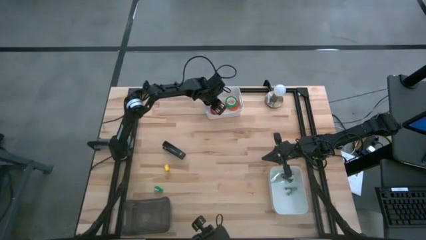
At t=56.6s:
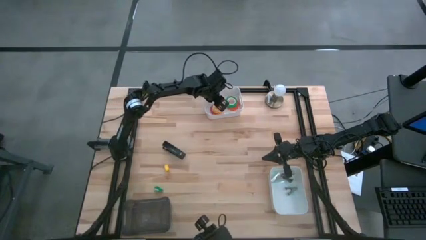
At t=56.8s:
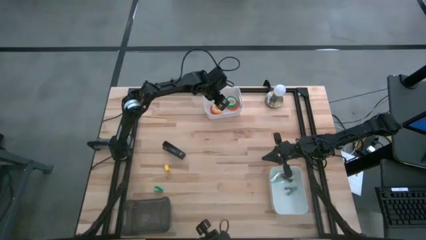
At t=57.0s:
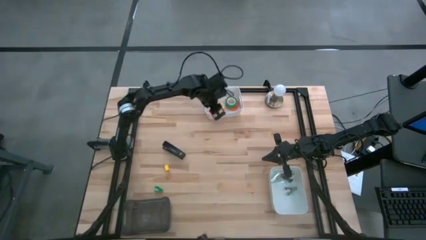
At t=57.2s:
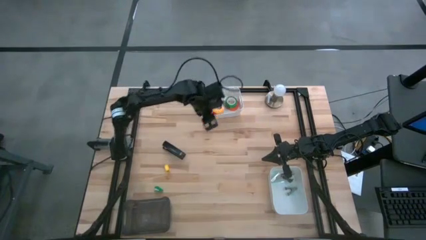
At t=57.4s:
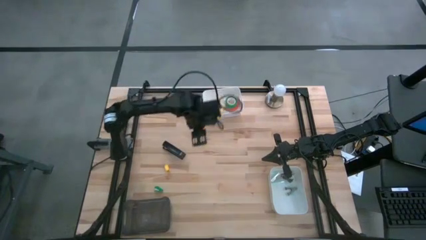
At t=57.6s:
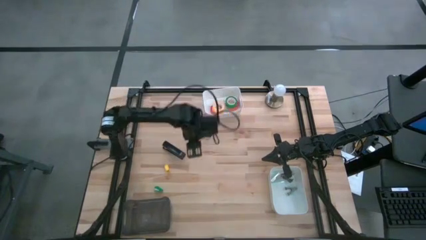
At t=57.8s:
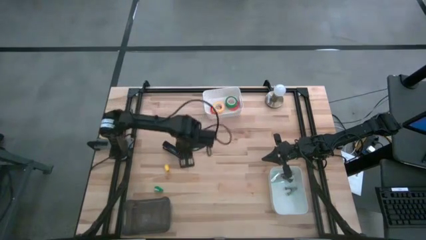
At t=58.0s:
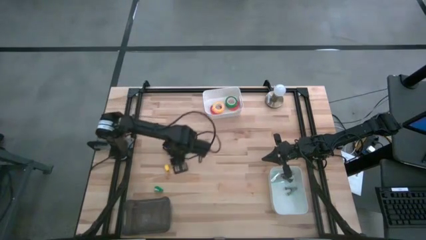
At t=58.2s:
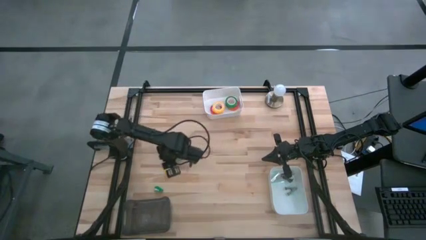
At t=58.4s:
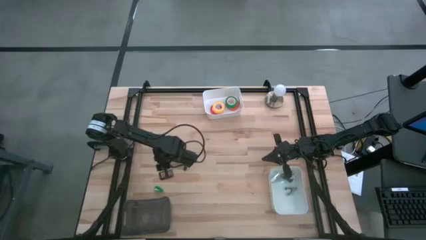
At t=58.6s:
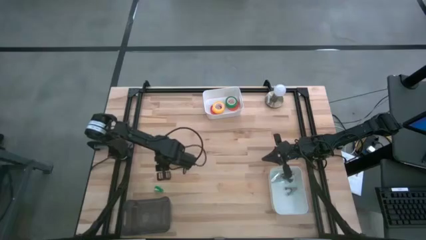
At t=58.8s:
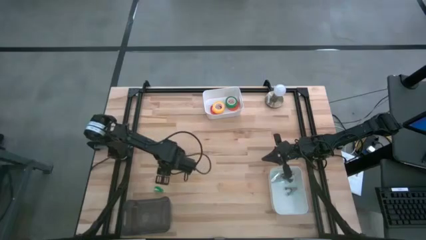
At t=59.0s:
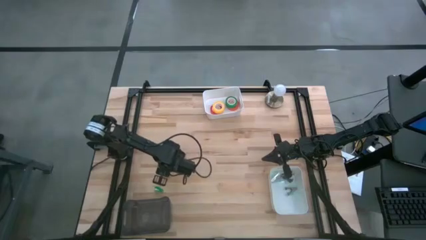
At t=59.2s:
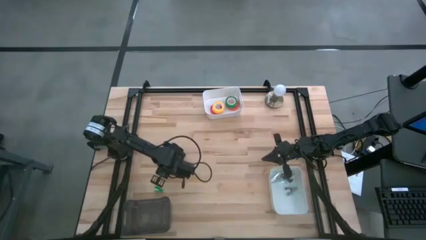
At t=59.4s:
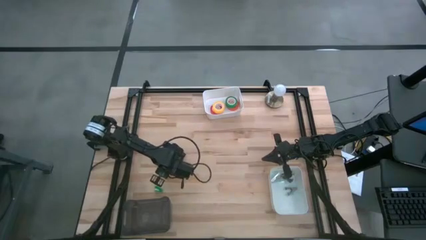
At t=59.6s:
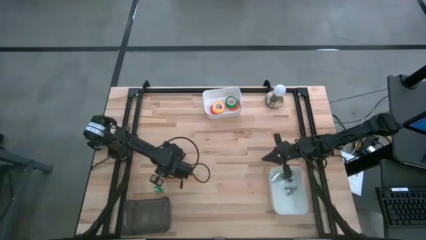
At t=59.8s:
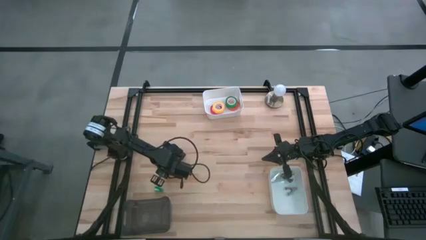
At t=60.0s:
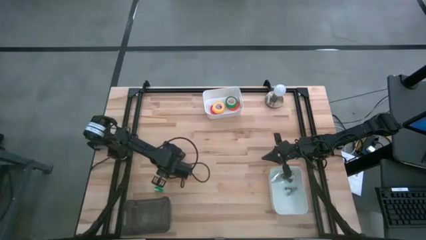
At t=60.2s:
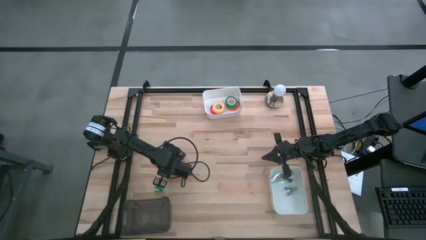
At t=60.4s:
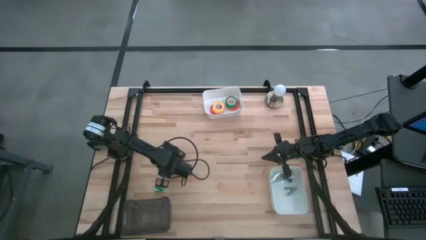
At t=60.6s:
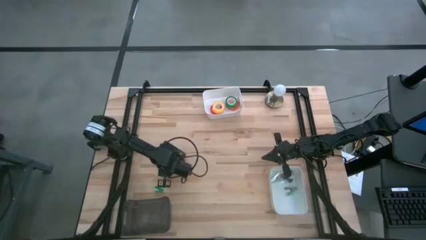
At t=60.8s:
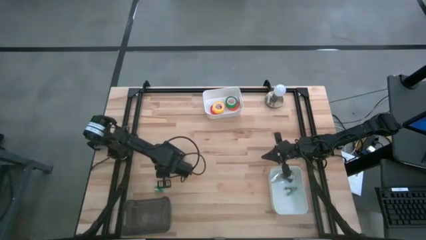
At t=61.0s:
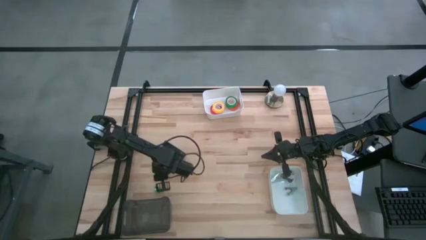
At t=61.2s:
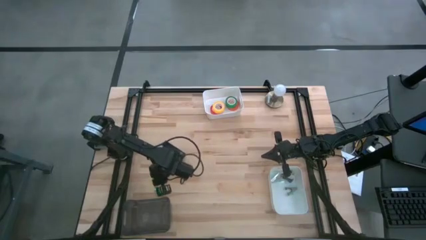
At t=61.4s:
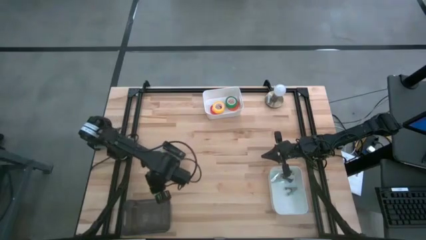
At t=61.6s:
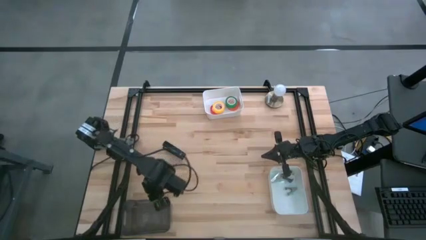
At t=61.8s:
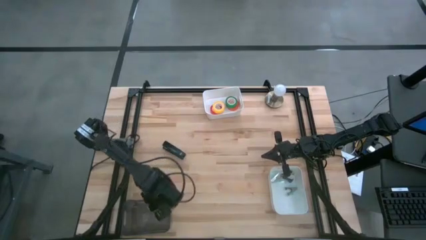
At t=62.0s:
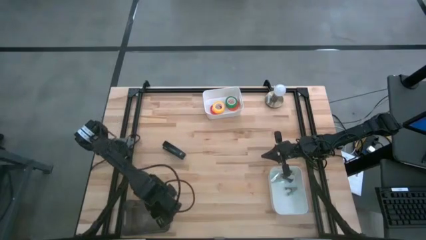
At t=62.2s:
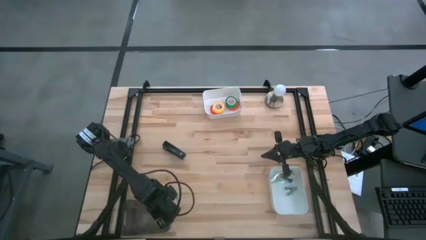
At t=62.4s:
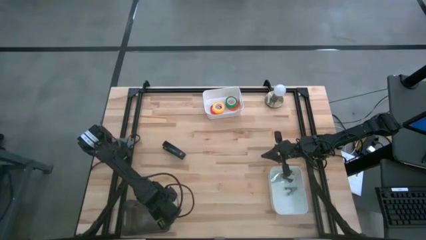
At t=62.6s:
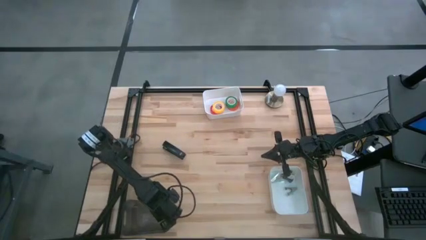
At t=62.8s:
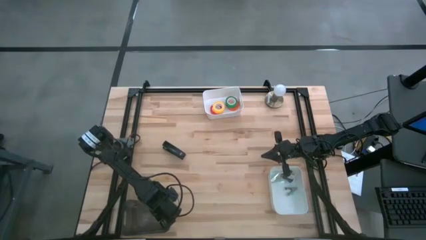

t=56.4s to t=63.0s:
Task: Pick and place Stapler, Stapler remover, tape
Put the yellow small stapler into the transparent bin

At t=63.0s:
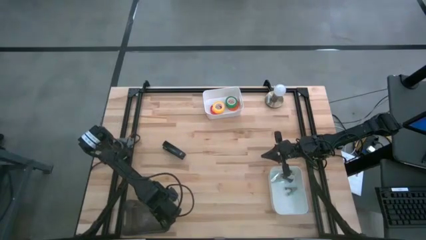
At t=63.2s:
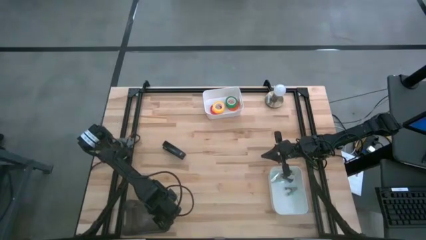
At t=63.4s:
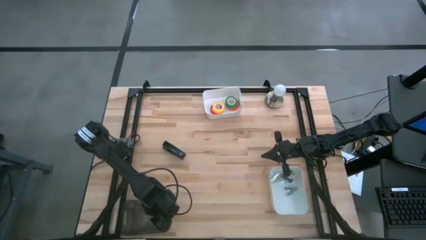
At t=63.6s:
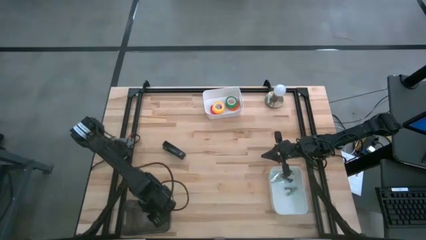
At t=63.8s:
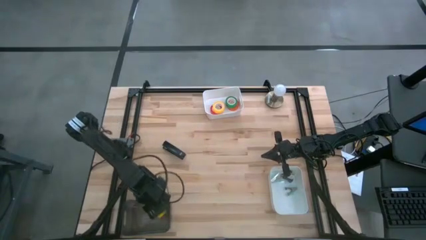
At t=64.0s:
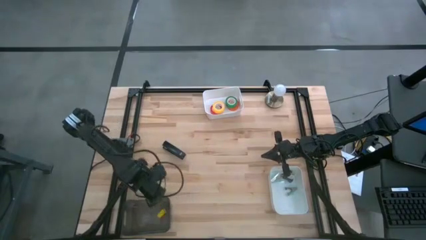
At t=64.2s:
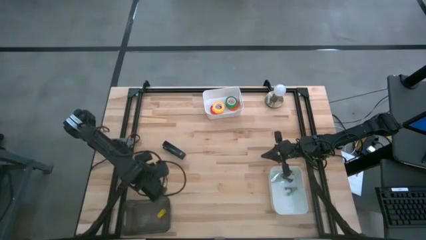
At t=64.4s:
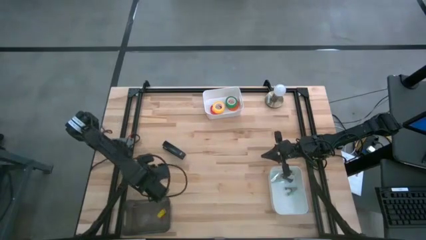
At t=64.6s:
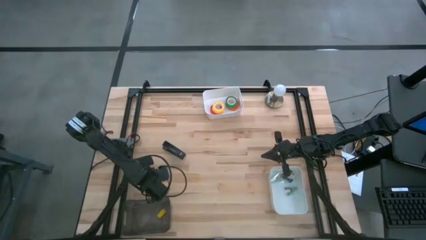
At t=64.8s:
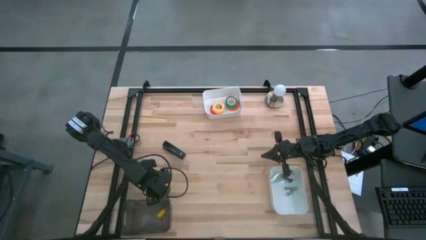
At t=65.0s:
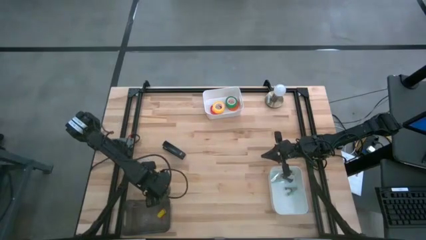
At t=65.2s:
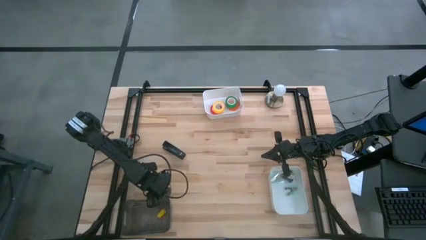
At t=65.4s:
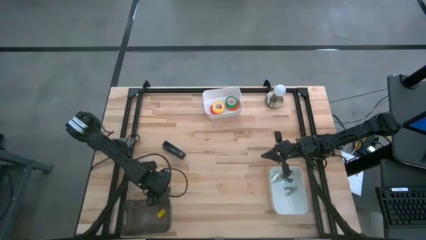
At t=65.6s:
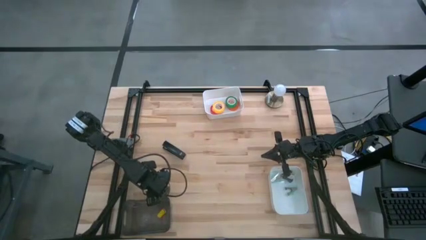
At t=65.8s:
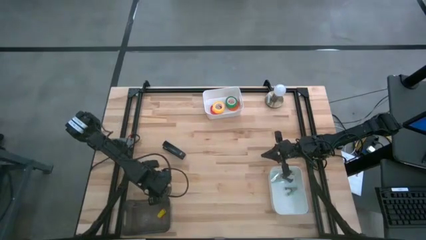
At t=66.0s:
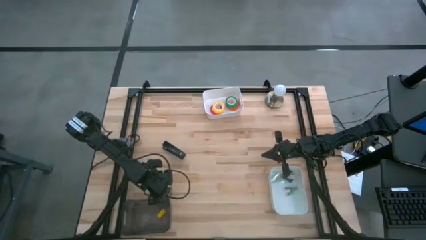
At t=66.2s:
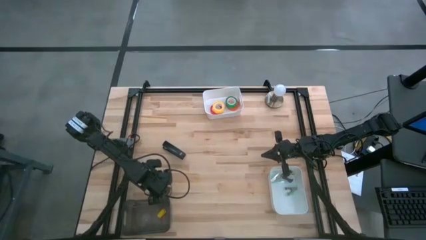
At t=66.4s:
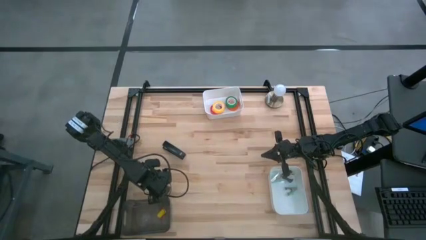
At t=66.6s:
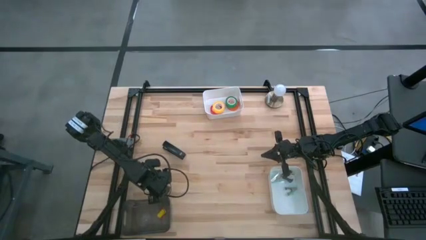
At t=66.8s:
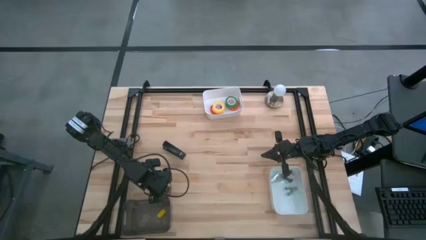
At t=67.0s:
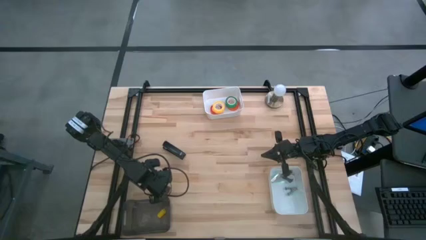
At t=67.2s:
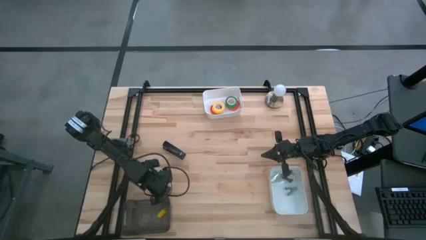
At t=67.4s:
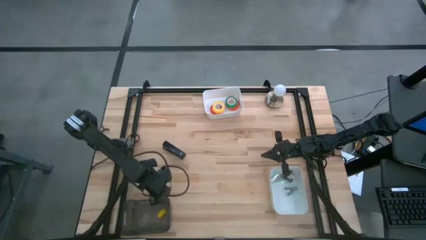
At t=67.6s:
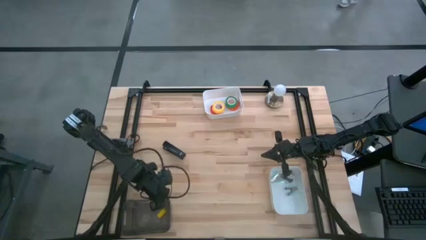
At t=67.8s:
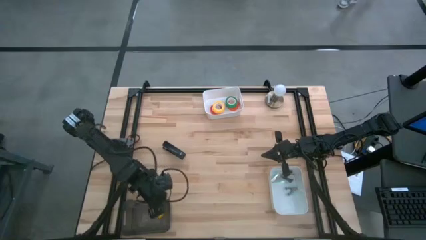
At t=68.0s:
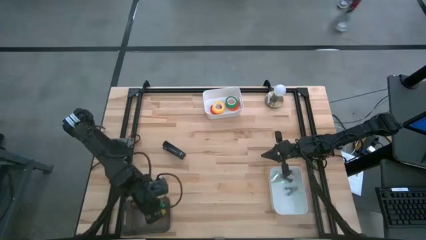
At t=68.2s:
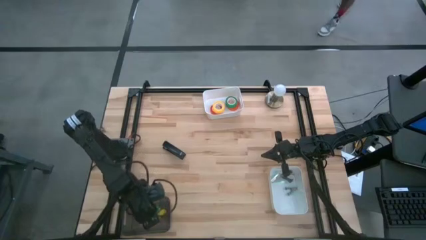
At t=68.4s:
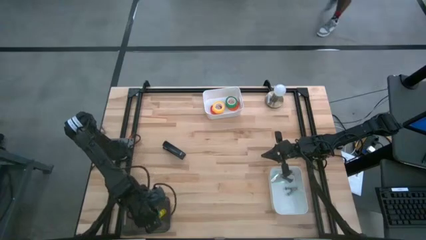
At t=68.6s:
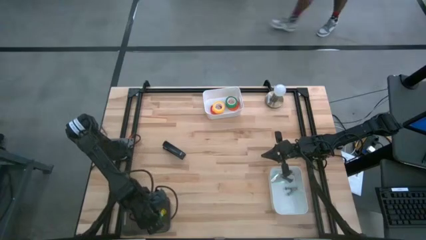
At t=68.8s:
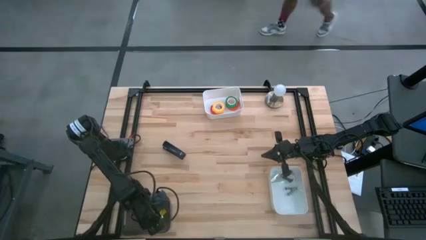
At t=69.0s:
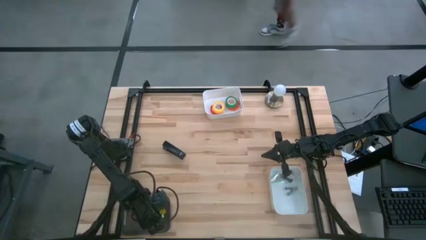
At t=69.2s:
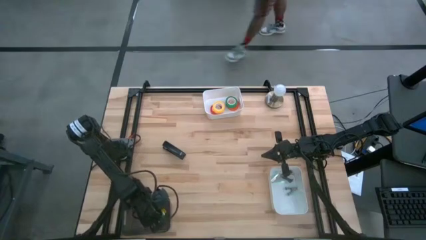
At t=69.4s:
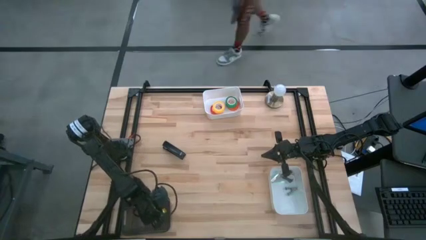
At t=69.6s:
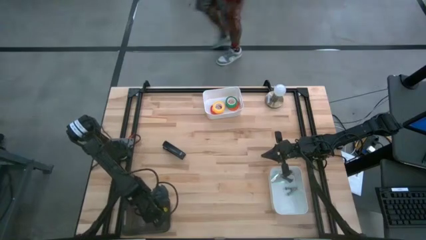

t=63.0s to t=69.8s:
Put the green small stapler into the transparent bin

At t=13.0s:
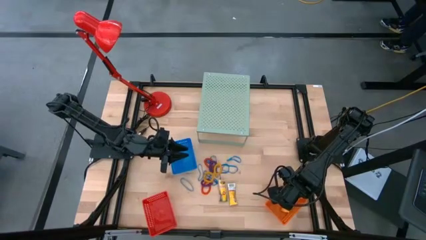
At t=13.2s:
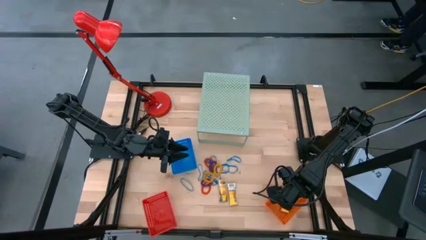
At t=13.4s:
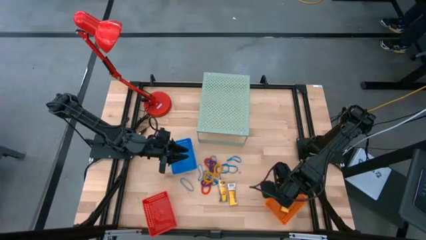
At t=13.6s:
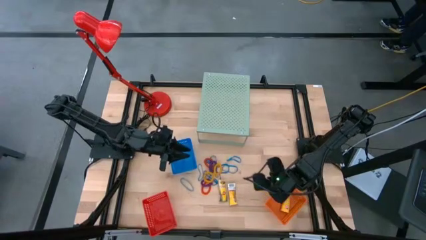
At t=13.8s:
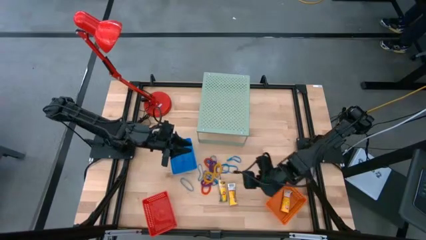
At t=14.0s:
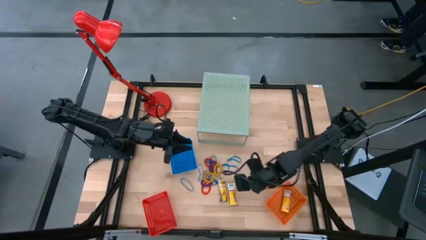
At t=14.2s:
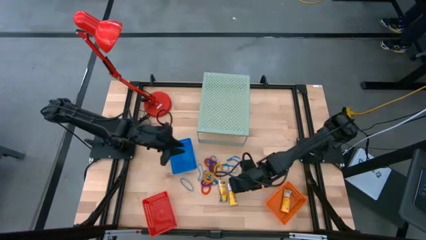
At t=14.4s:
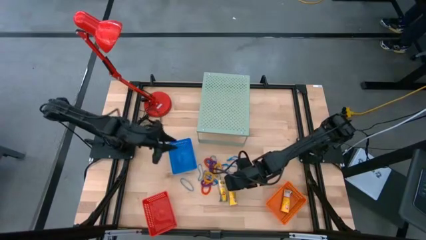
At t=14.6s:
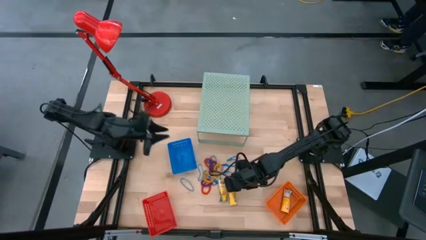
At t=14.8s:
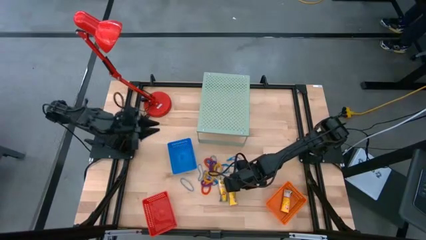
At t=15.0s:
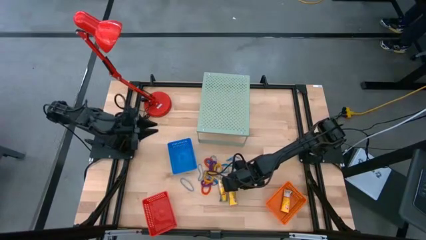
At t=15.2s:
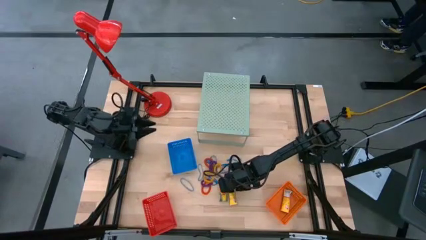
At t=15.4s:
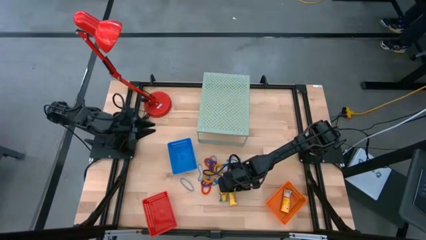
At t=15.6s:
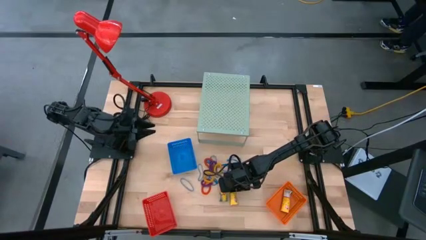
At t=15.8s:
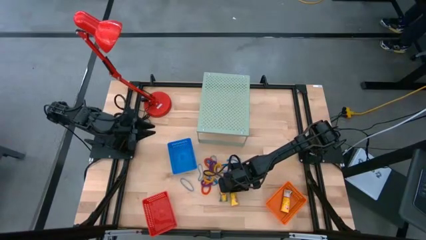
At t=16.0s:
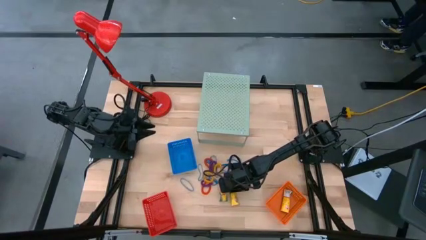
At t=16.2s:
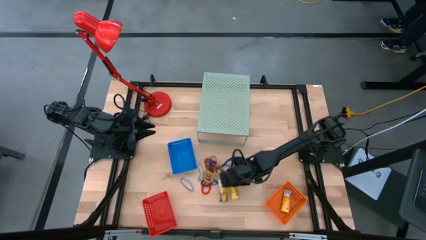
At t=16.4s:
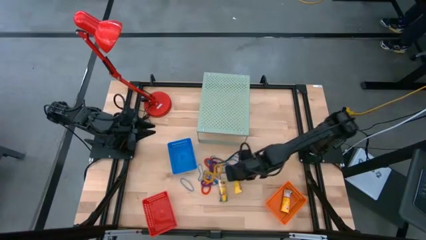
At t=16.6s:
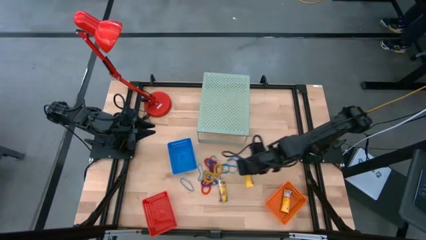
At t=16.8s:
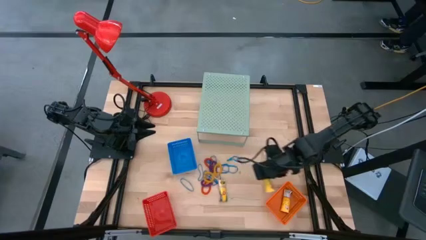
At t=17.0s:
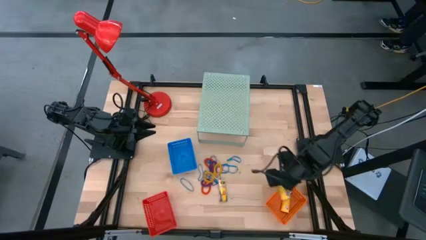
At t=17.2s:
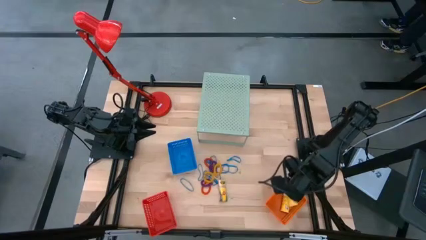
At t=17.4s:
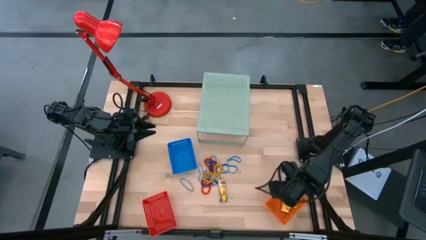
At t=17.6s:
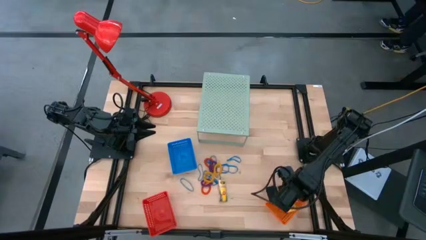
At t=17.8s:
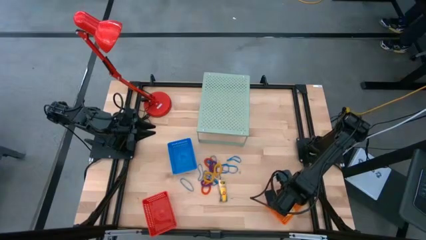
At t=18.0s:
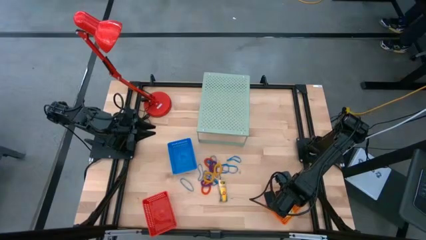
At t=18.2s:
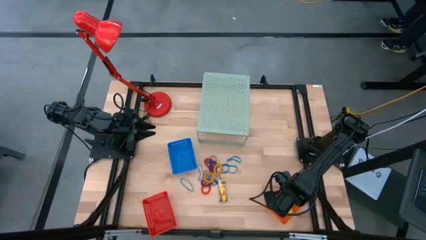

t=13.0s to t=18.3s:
Task: Pick & Place Office Desk Supplies
Put the yellow crayon box into the orange basket
